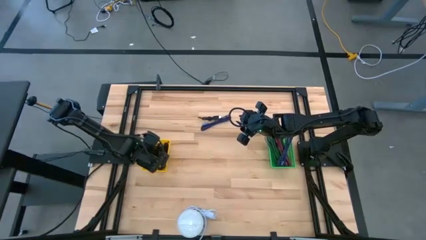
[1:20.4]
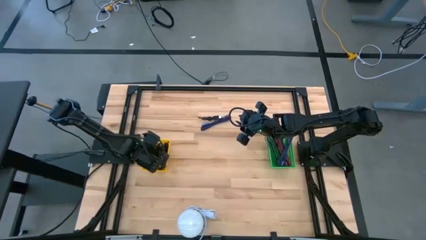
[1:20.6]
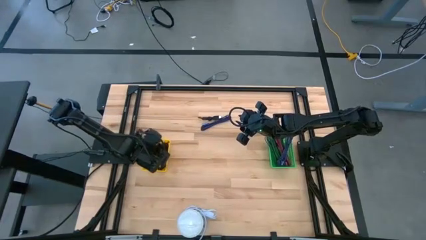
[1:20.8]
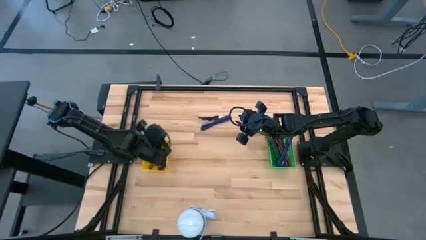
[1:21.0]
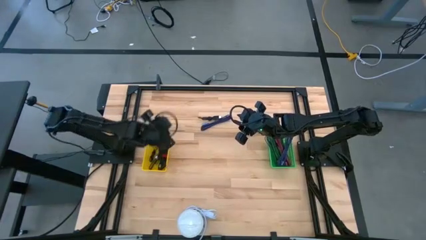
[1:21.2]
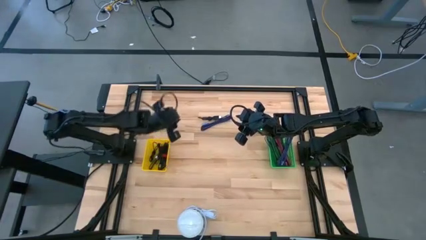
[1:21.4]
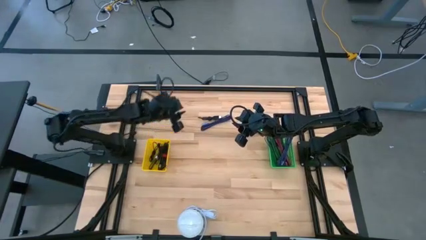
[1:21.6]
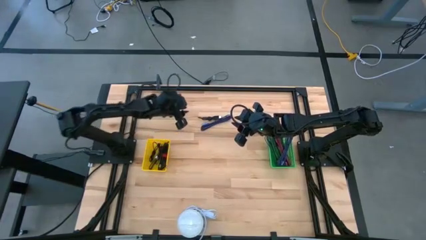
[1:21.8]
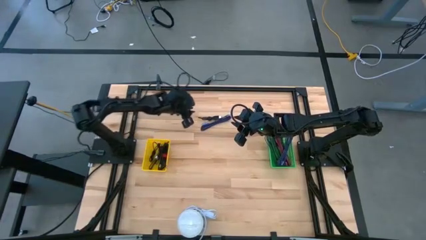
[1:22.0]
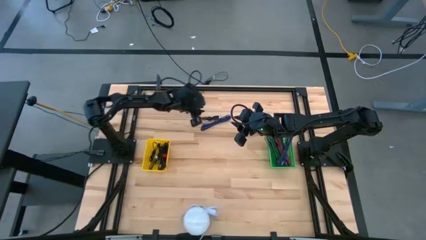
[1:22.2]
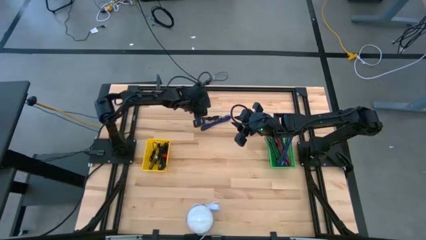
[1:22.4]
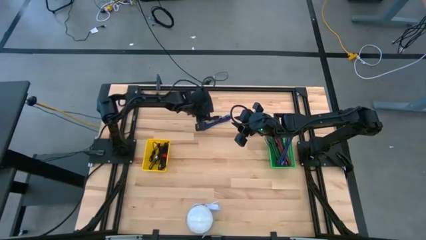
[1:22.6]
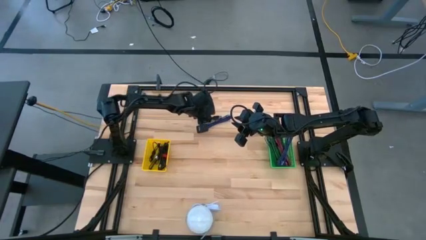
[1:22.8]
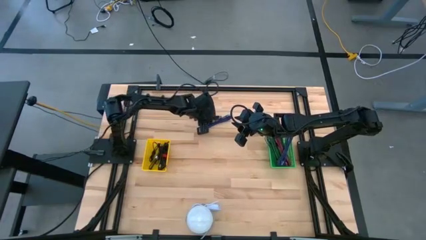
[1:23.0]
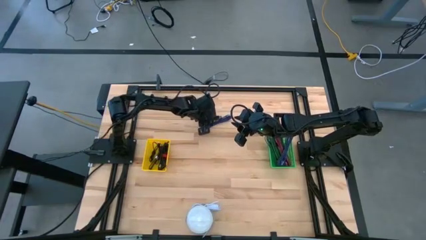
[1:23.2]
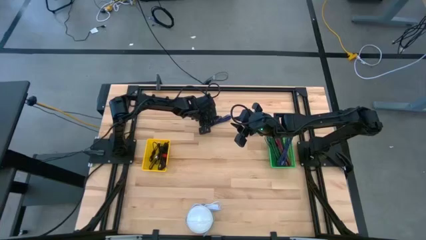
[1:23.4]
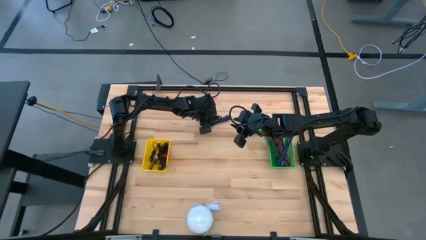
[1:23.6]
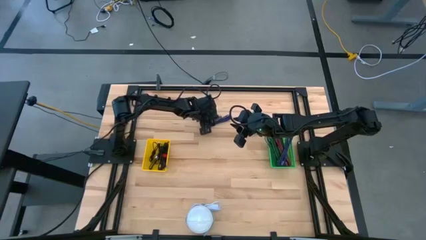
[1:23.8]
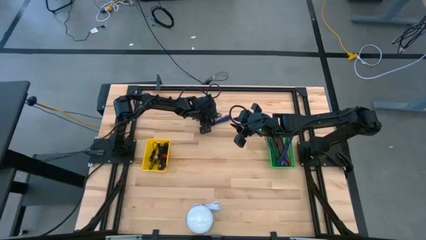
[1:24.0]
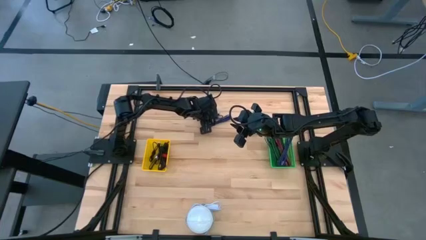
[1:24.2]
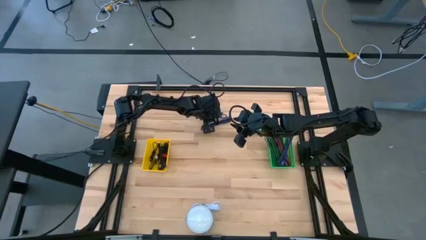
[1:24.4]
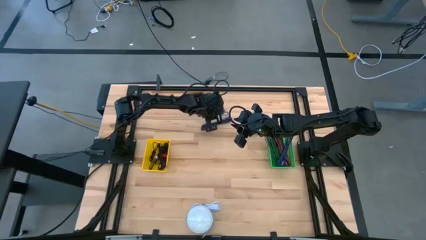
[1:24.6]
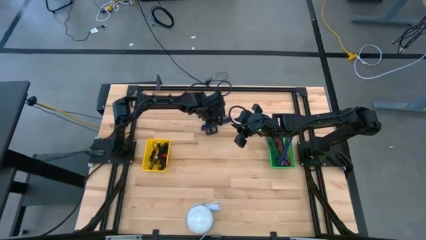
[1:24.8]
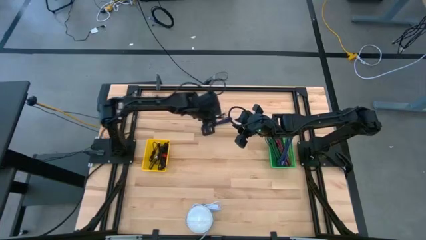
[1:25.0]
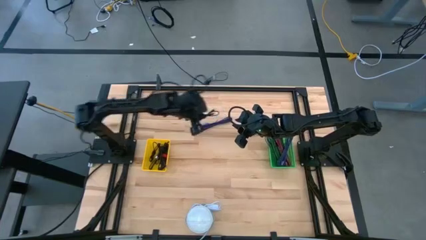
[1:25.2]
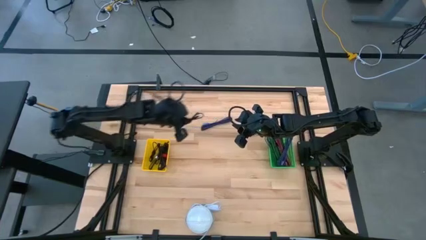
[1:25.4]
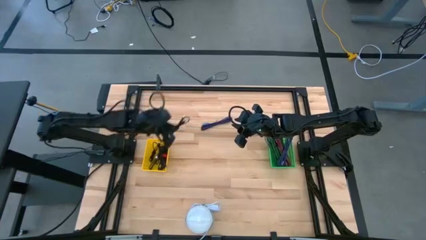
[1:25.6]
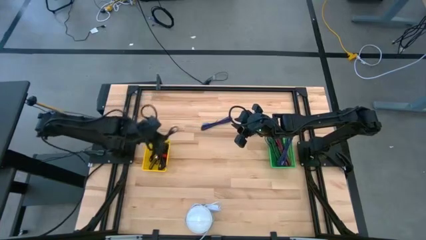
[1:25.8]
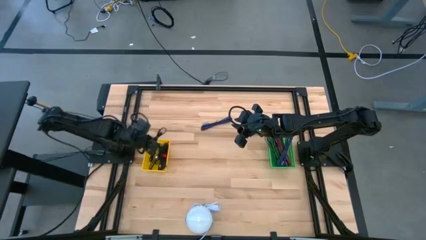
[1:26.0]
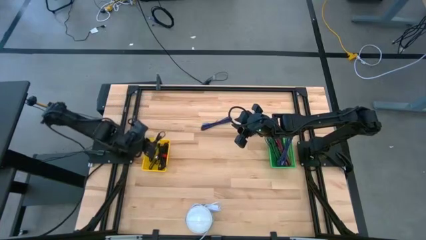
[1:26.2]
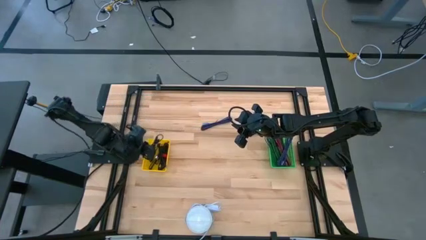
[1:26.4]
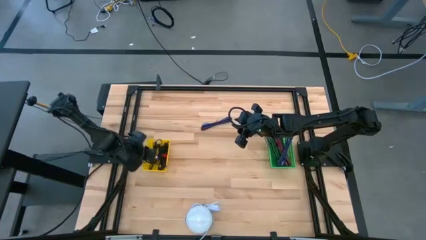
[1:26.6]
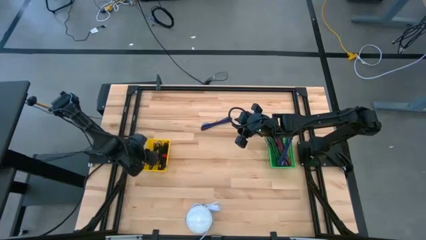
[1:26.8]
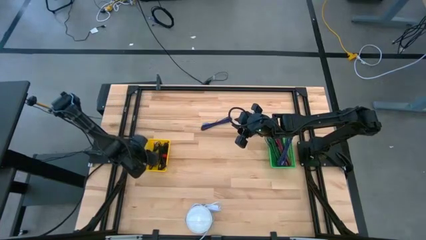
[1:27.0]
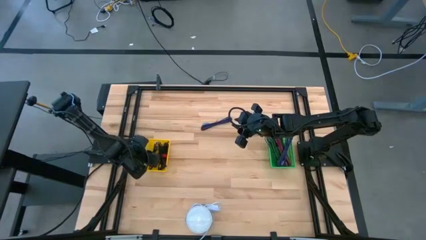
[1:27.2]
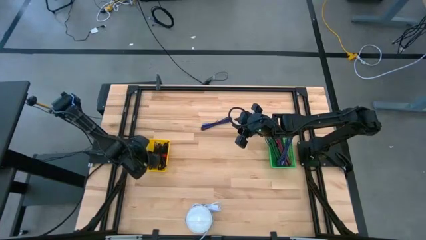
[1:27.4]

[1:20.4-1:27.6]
Task: Pick & Place USB Port
Put the black charger cable into the yellow basket

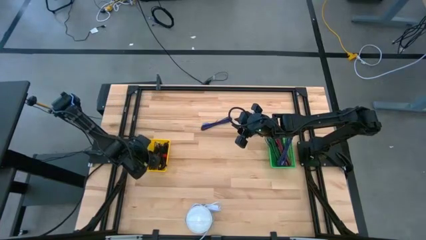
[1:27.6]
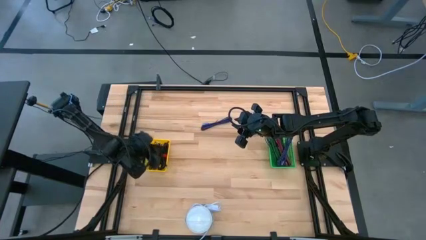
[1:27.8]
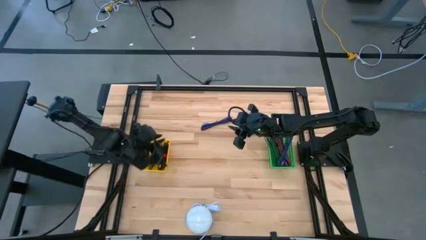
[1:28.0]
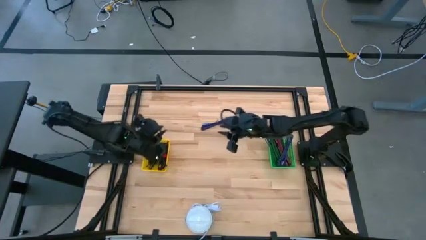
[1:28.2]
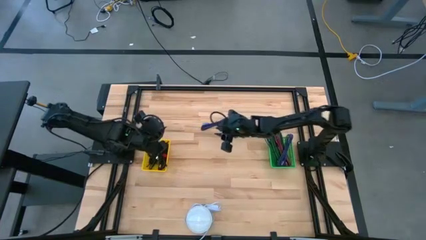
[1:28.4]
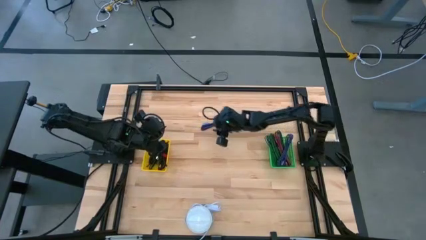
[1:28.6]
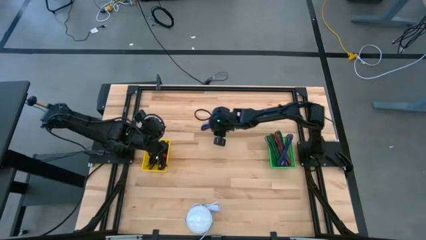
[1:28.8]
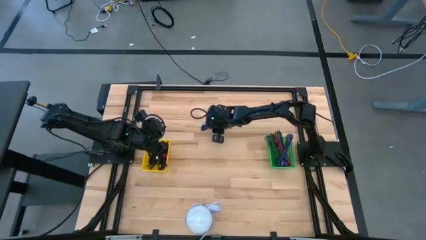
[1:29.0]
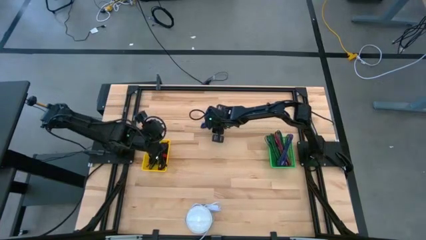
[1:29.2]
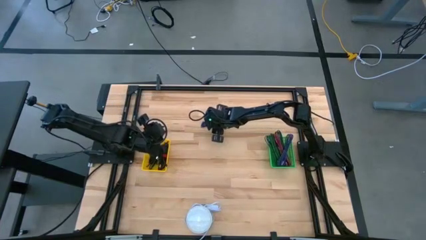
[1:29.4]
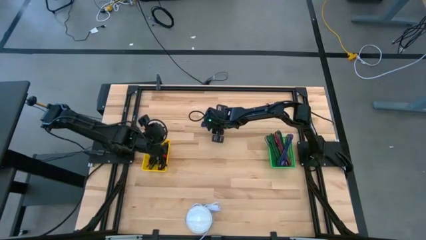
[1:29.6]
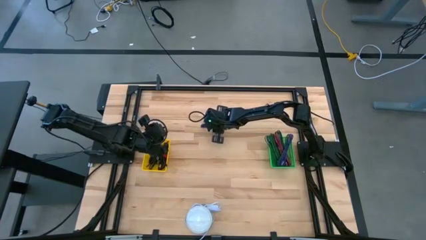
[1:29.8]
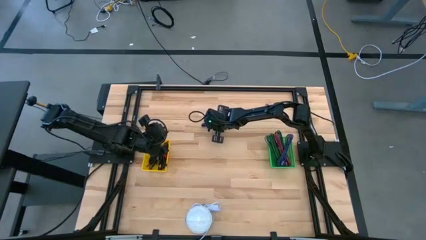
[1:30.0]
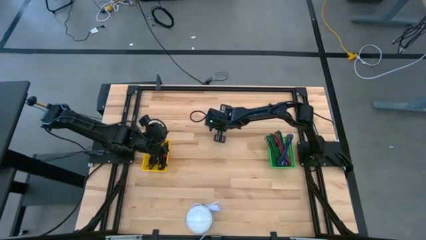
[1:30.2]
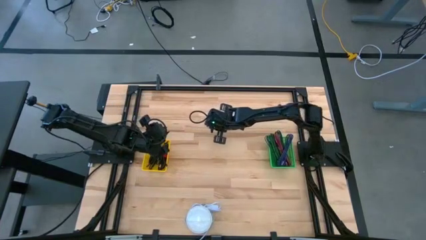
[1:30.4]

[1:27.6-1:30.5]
Put the black and blue charger cable into the green basket

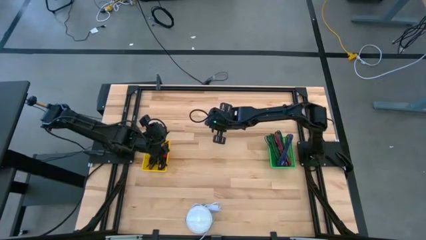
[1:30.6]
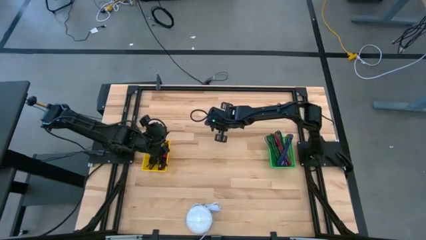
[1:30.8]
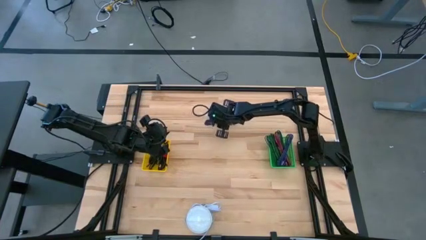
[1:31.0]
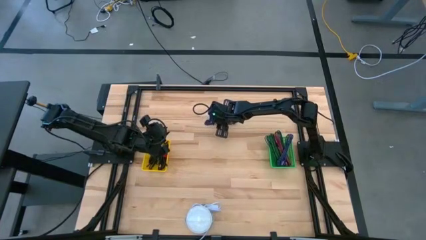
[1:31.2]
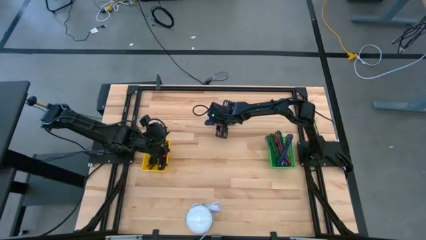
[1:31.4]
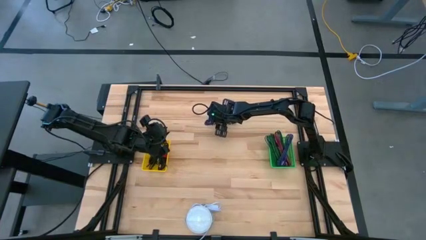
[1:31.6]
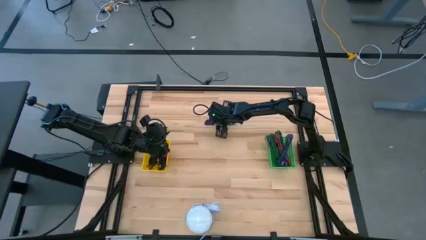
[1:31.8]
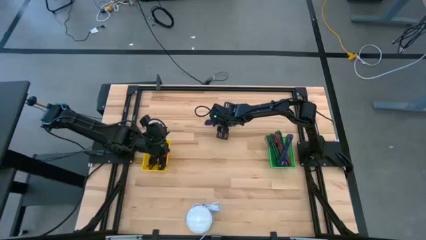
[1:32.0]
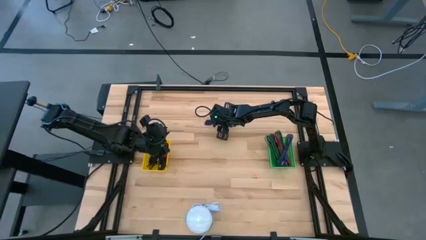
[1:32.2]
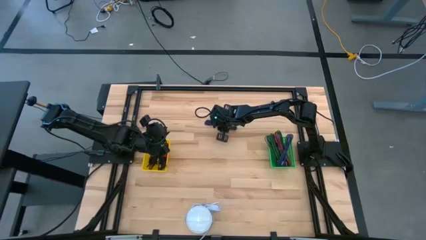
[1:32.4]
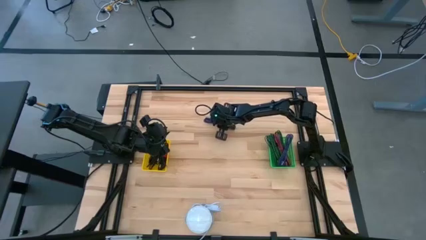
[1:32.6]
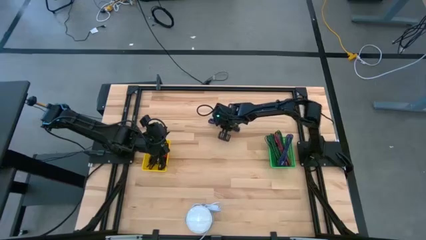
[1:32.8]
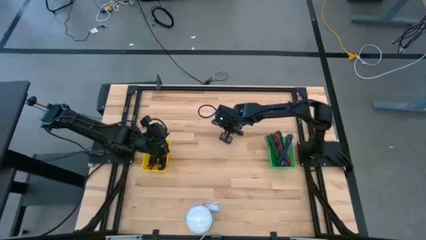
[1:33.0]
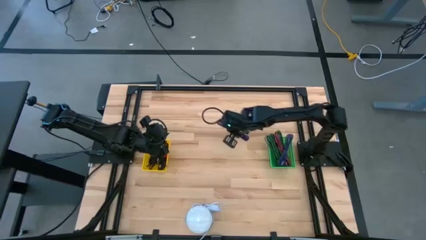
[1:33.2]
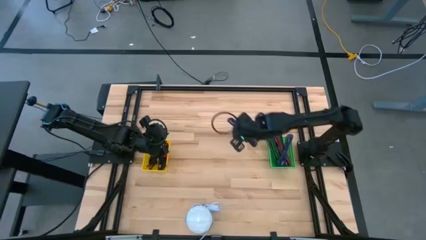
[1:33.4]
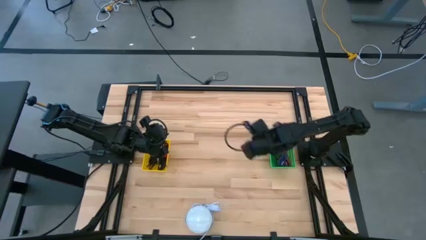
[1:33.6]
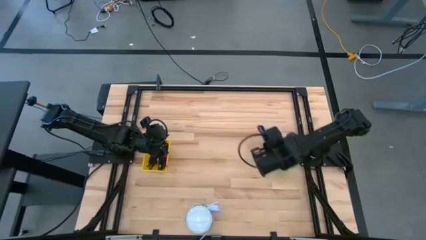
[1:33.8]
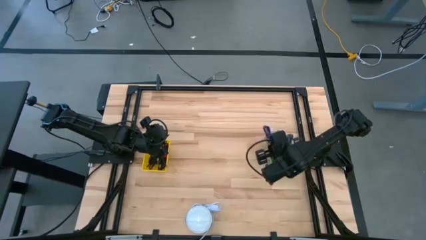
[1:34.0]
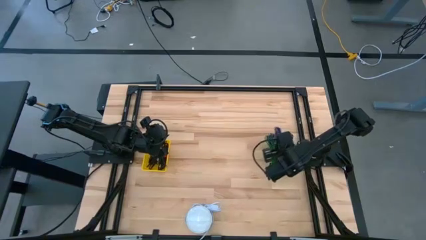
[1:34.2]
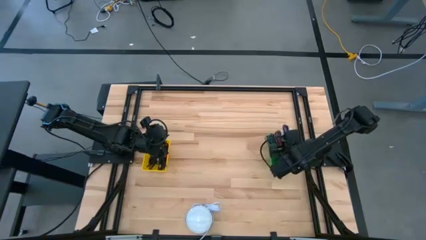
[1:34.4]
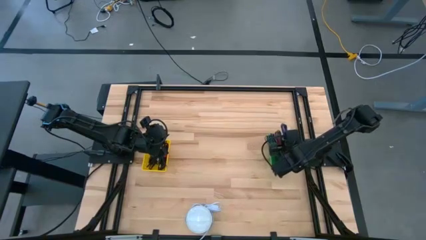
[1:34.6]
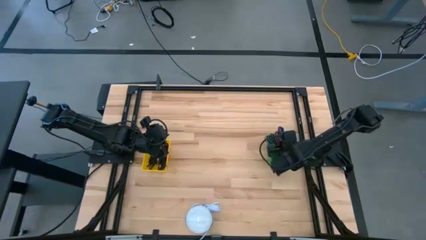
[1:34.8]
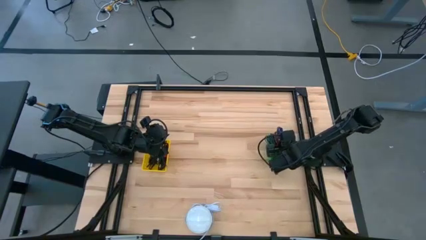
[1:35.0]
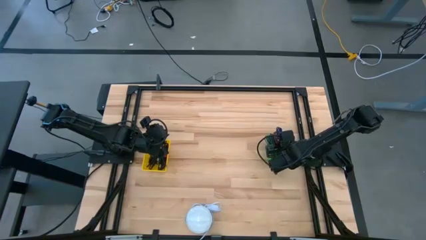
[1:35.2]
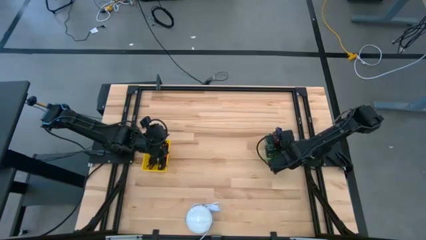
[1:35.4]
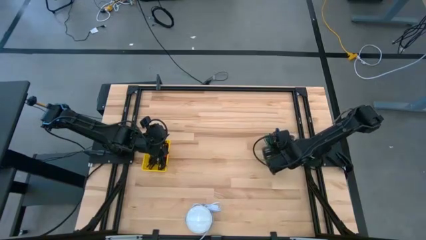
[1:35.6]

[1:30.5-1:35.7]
Put the black and blue charger cable into the green basket
